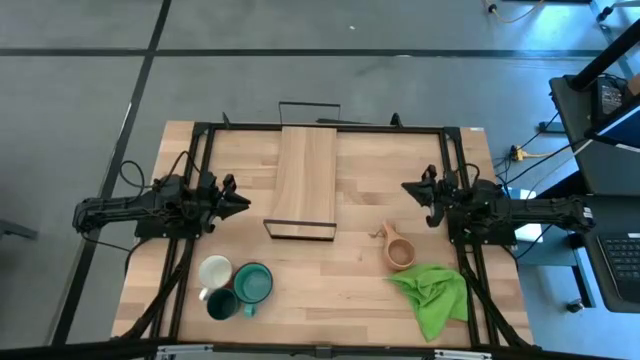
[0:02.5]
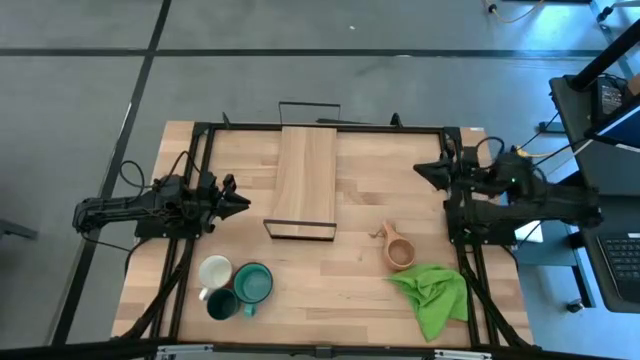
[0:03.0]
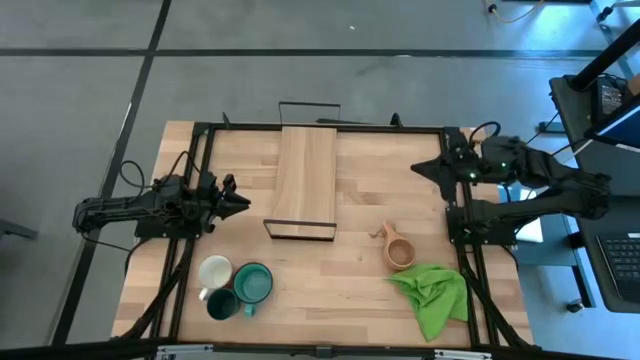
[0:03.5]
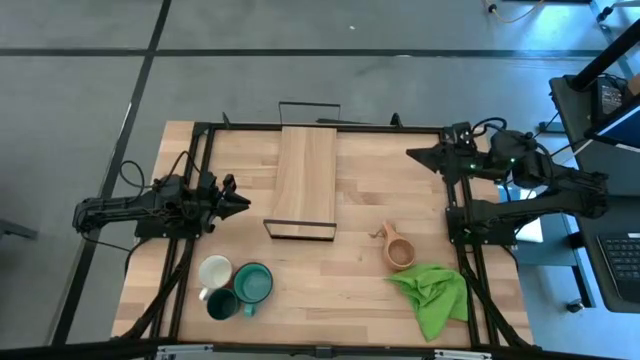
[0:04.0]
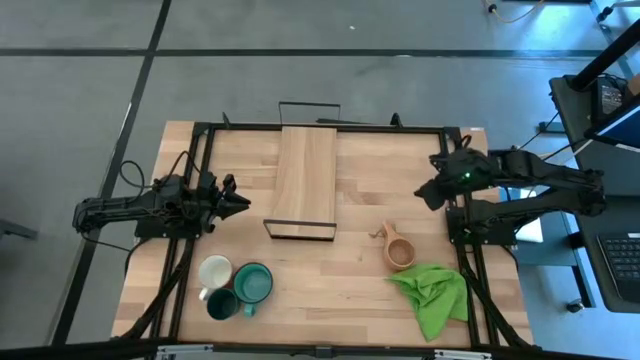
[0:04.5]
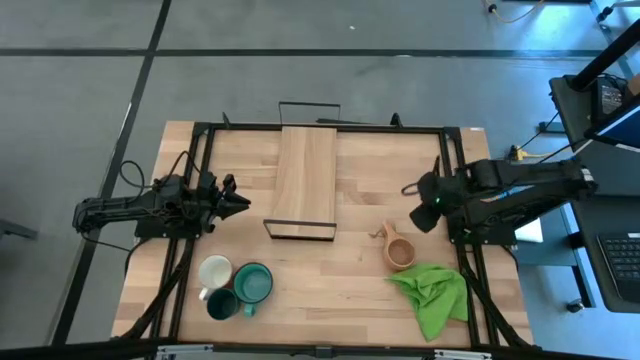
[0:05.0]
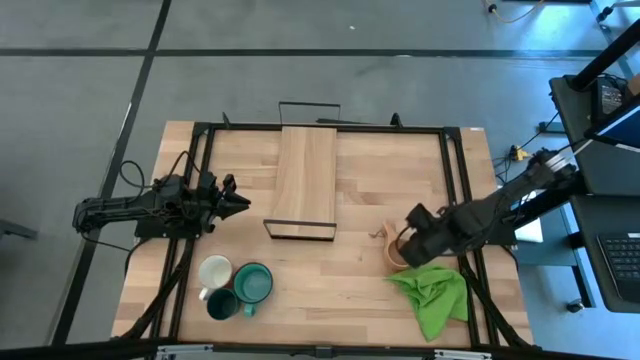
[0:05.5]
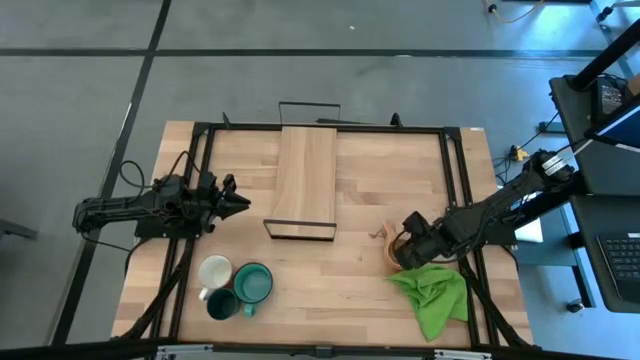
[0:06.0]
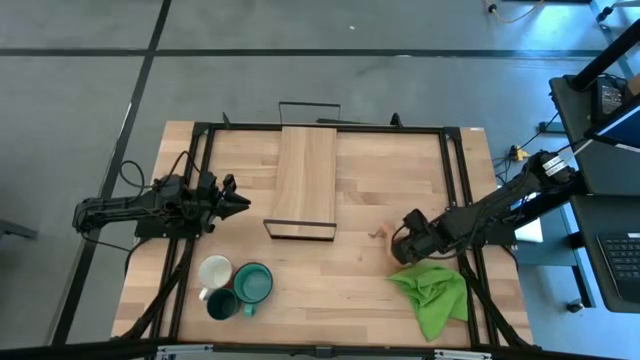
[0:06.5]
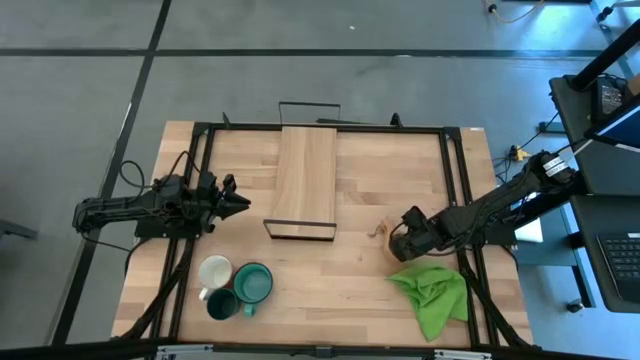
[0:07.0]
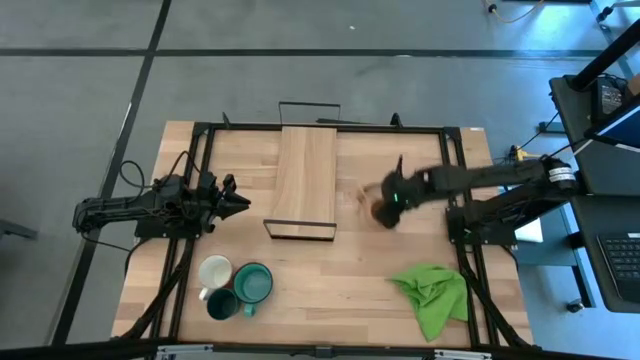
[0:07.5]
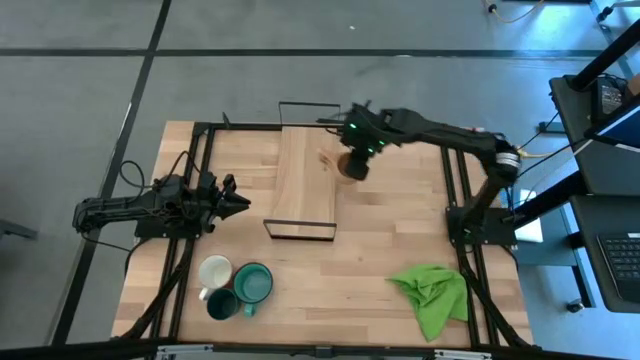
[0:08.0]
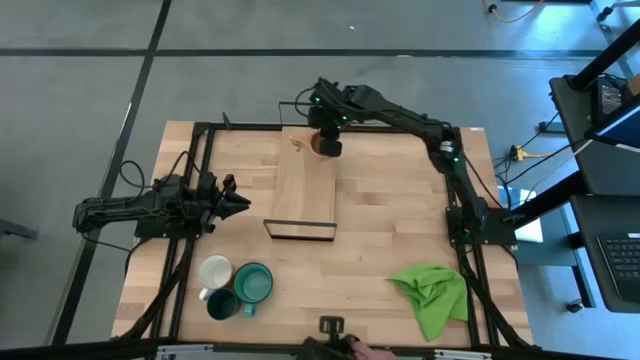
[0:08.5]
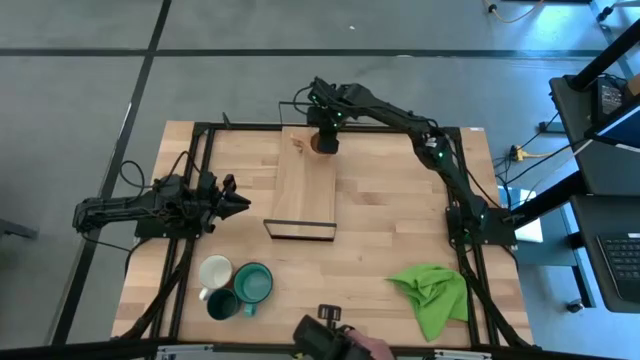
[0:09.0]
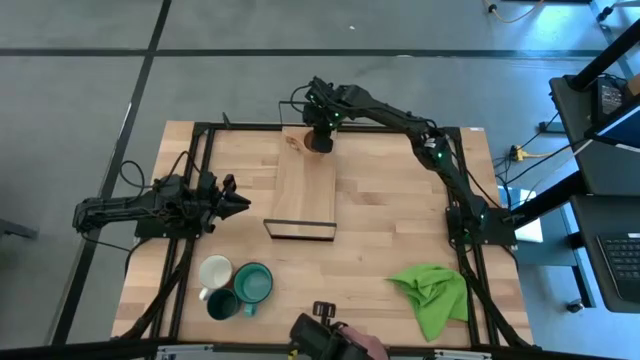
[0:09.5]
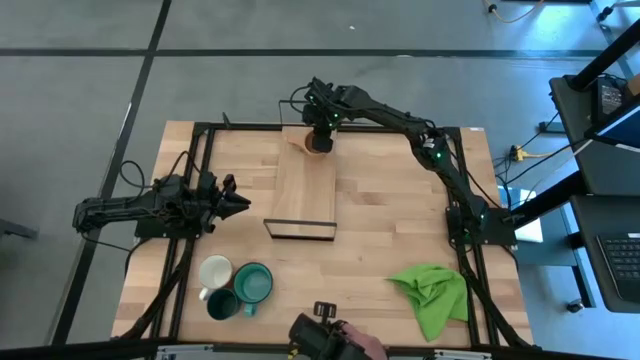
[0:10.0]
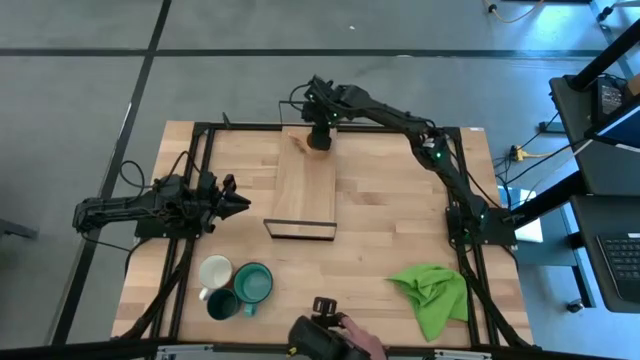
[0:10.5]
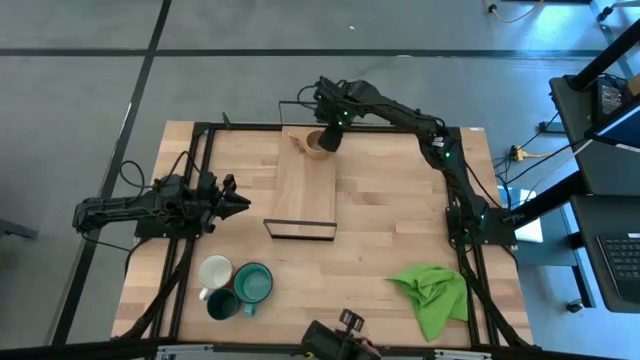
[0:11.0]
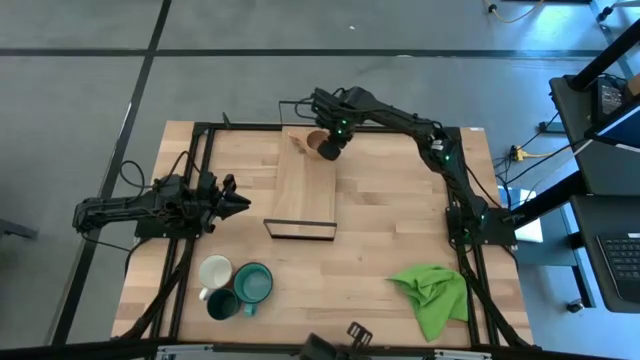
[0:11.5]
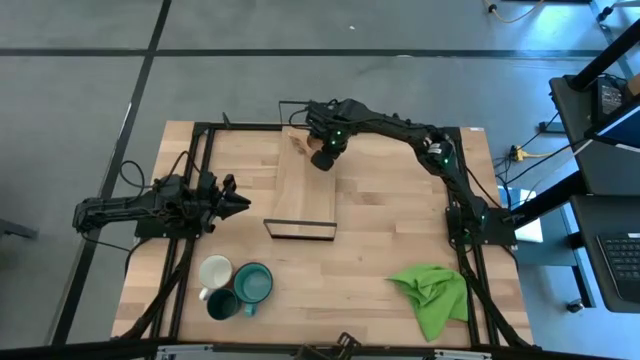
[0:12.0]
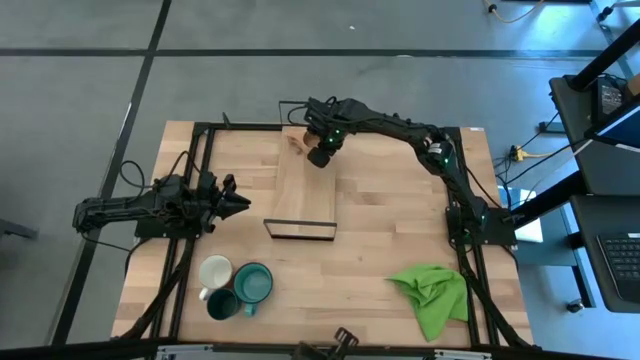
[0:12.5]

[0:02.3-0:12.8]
Task: Stack small to large cups/mugs on shelf
Put the brown mug on the shelf

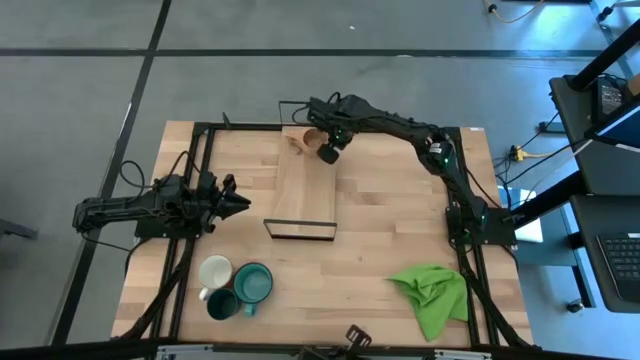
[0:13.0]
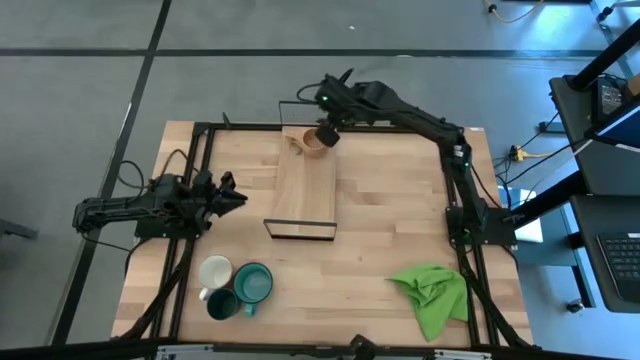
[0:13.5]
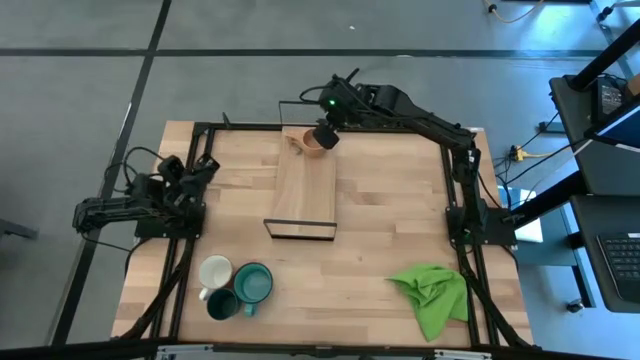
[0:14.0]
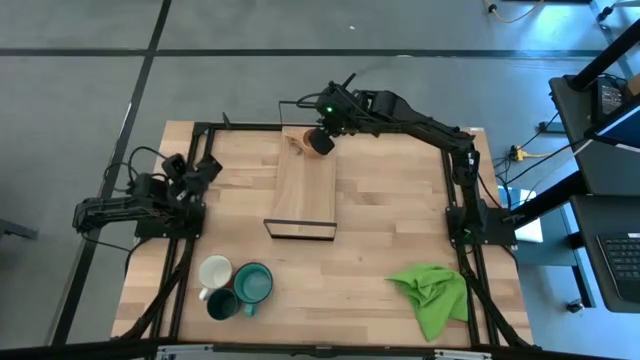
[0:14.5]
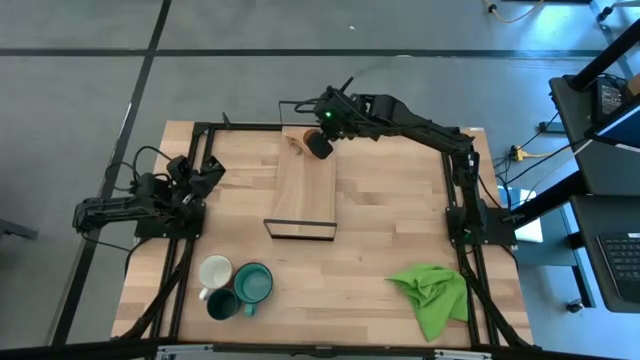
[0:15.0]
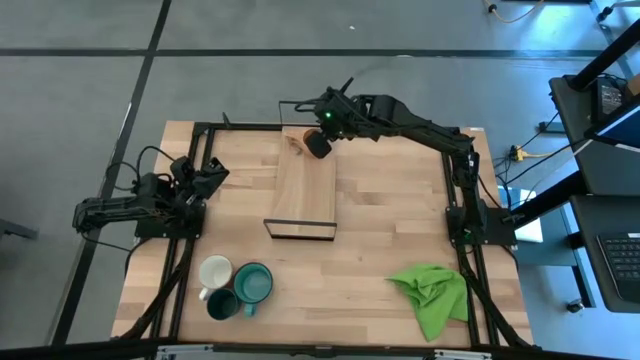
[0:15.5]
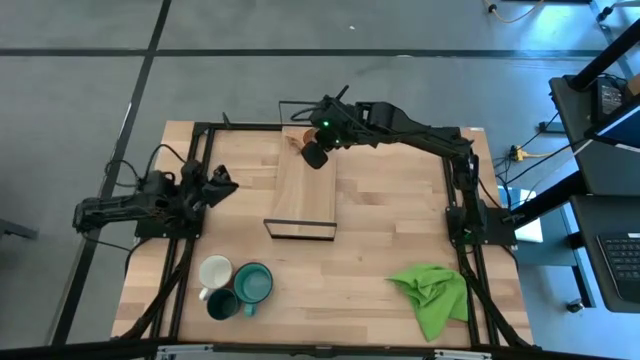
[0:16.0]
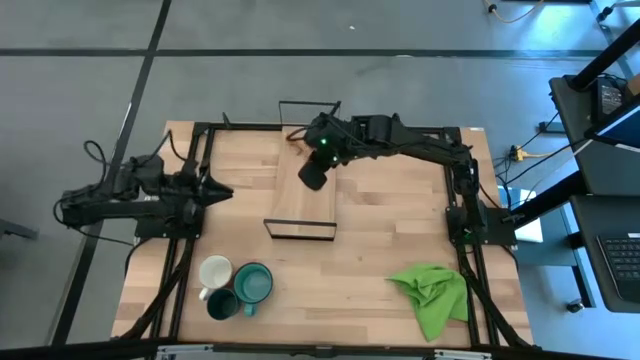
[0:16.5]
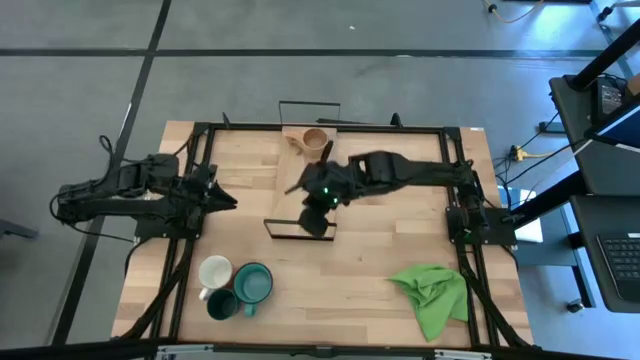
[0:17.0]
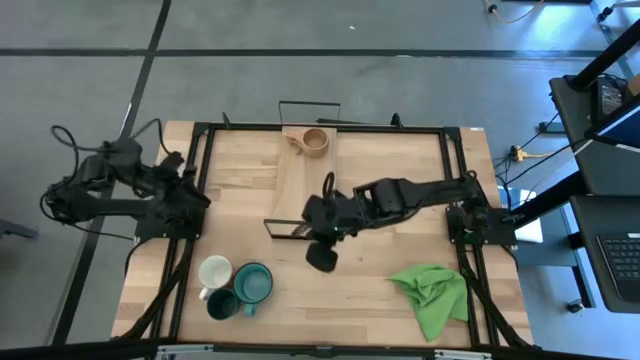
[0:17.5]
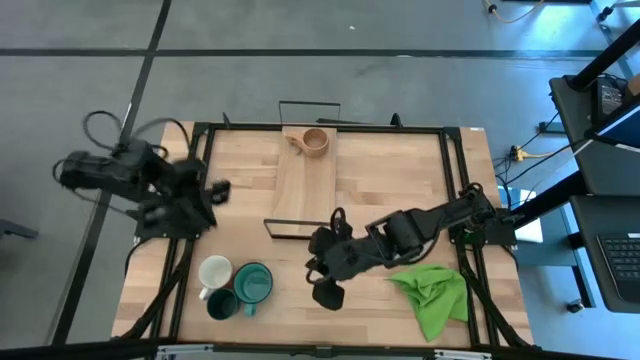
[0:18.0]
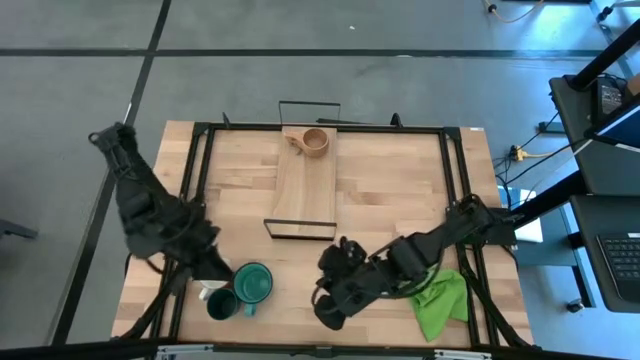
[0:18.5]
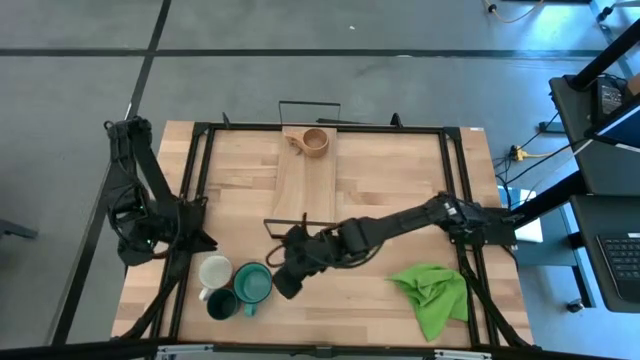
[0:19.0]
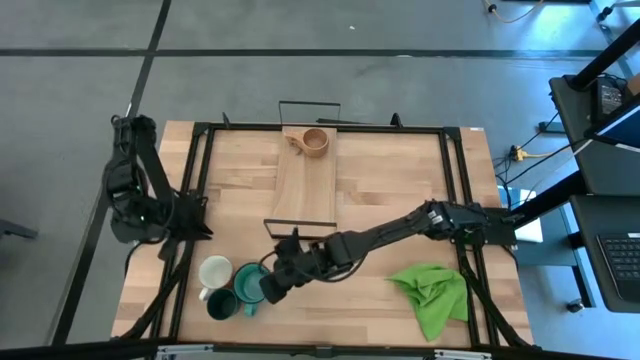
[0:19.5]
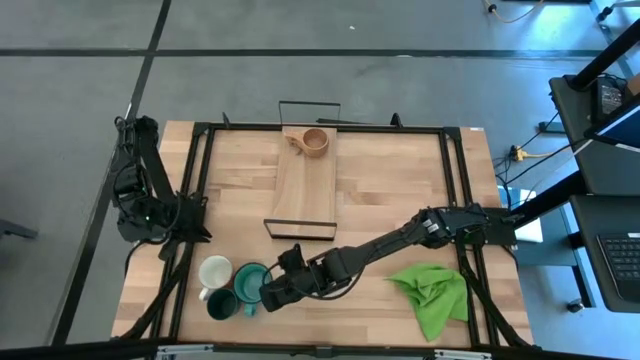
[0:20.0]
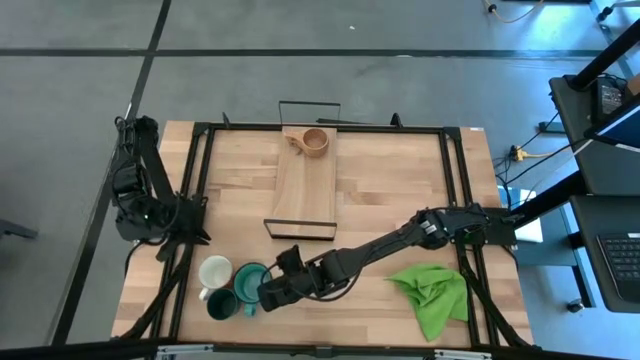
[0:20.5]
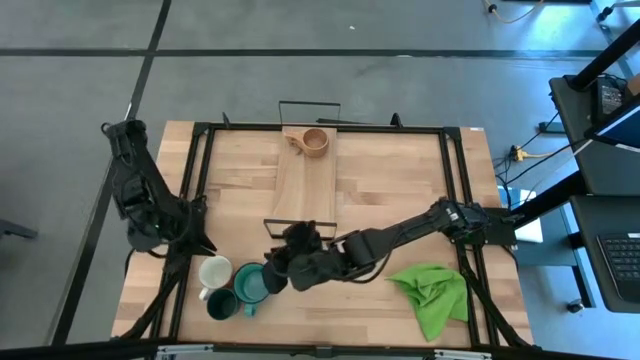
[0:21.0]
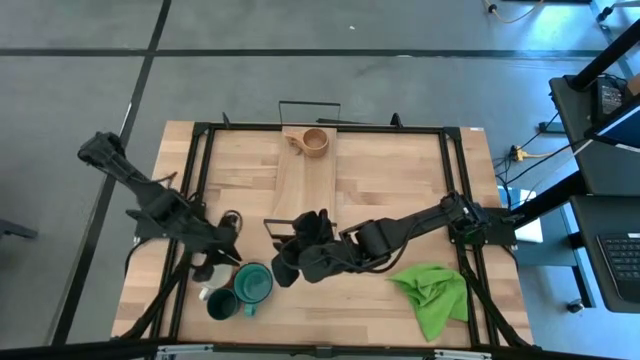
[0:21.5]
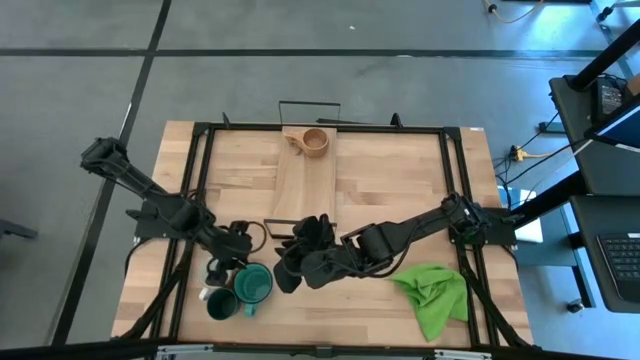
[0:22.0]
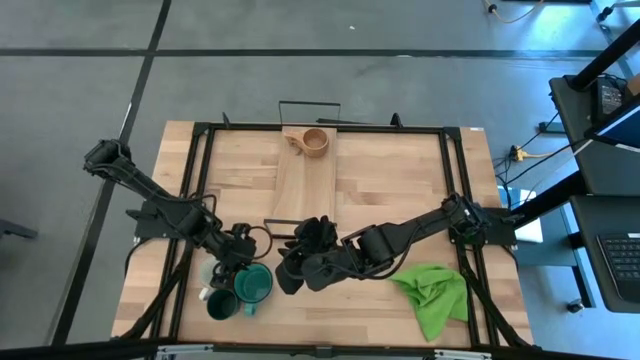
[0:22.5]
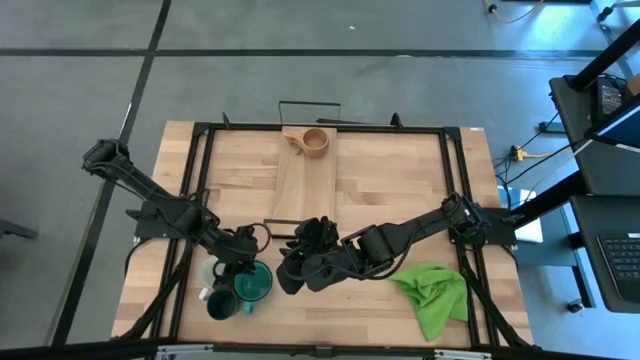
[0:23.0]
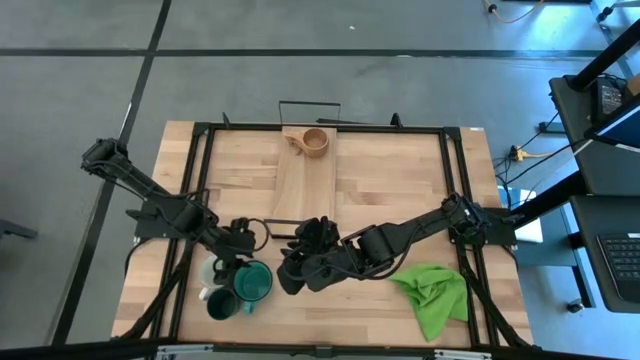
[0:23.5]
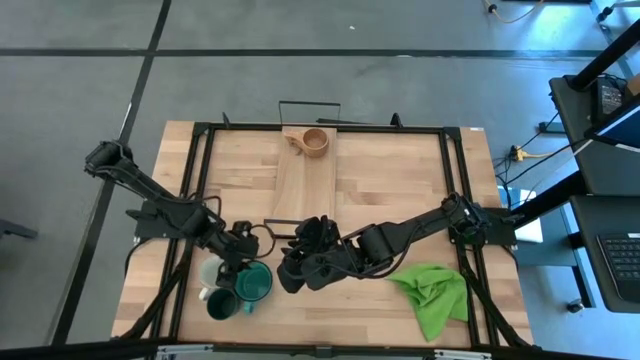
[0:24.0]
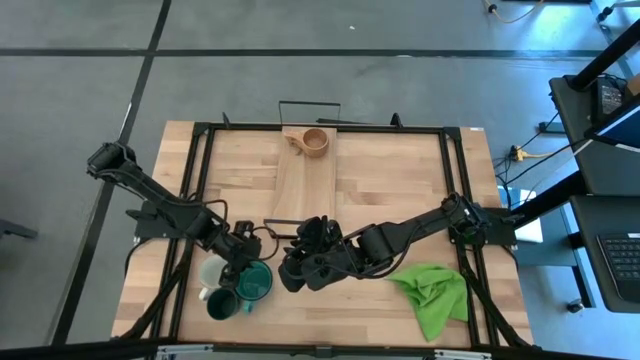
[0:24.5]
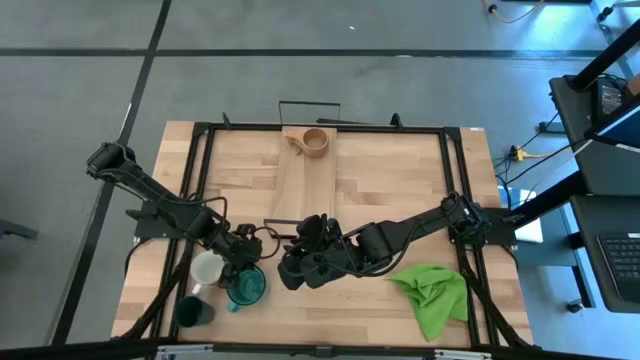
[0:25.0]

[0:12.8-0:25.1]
Put the blue mug on the shelf

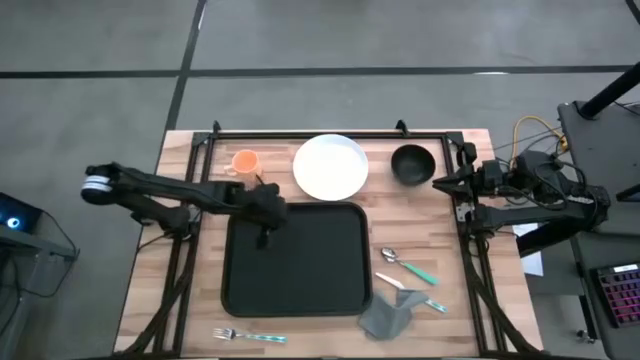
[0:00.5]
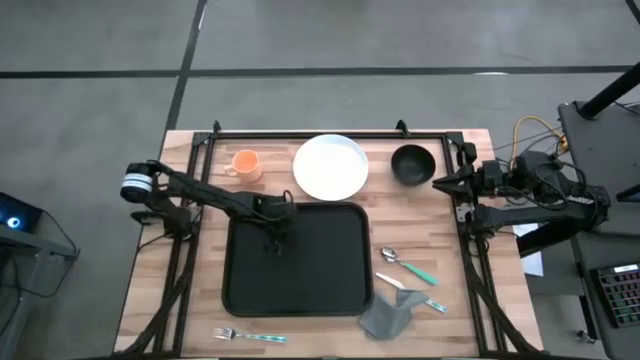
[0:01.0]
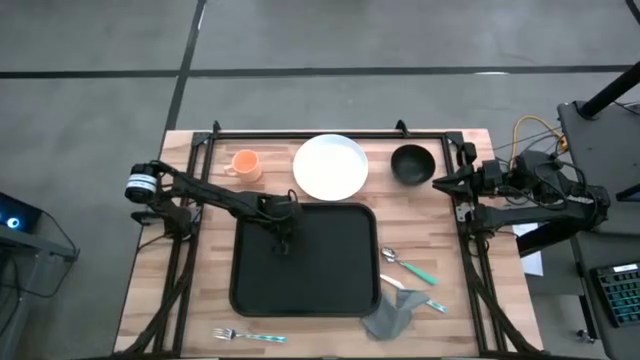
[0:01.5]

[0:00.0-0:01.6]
Task: Set up tray
Prepare the serving tray
